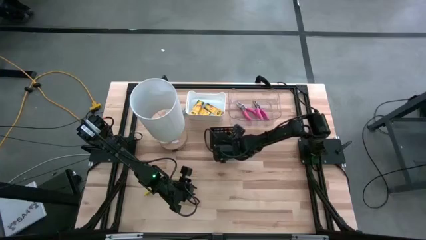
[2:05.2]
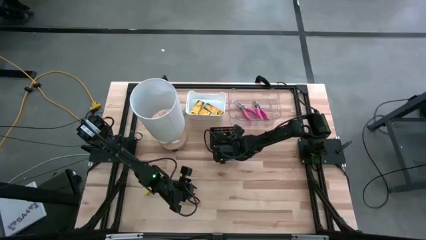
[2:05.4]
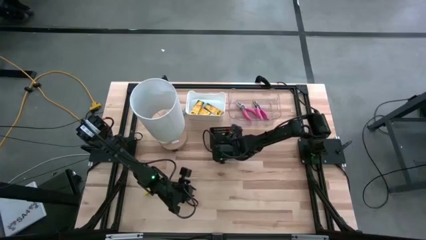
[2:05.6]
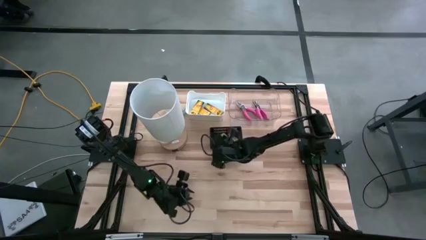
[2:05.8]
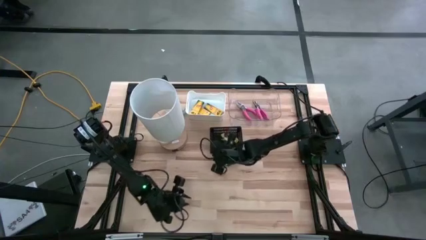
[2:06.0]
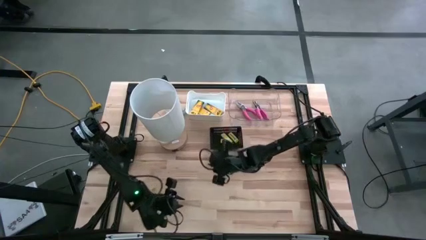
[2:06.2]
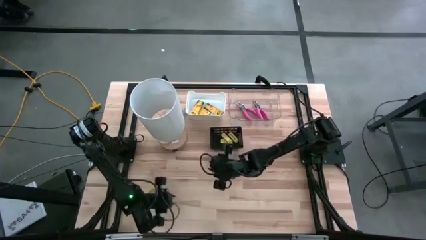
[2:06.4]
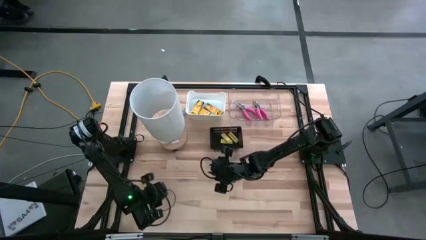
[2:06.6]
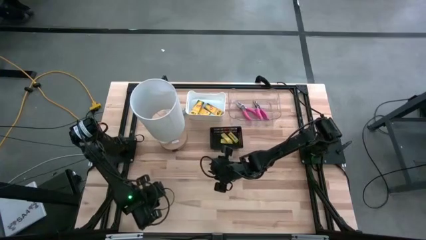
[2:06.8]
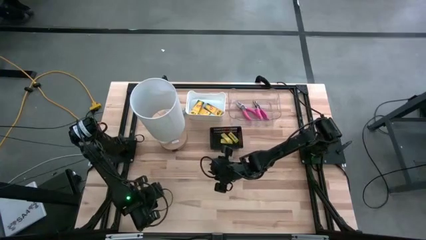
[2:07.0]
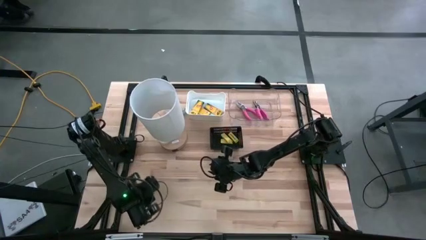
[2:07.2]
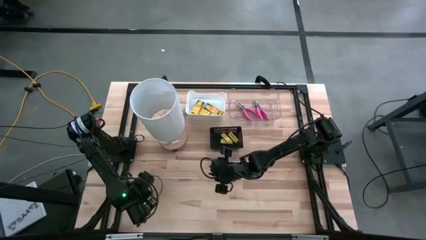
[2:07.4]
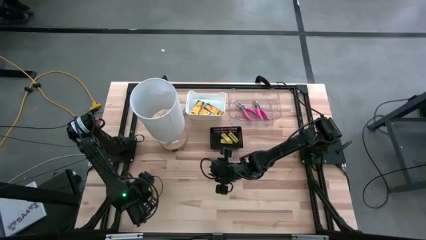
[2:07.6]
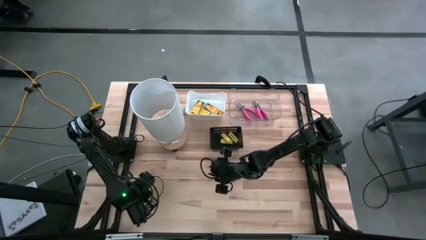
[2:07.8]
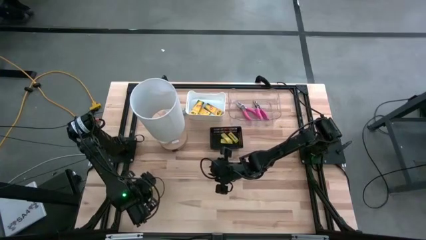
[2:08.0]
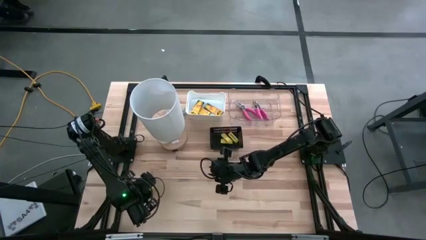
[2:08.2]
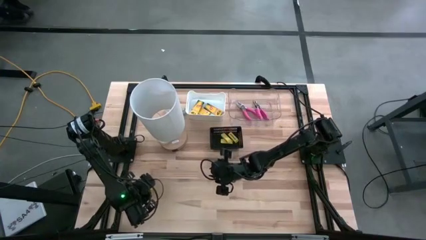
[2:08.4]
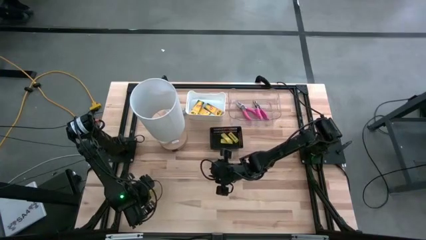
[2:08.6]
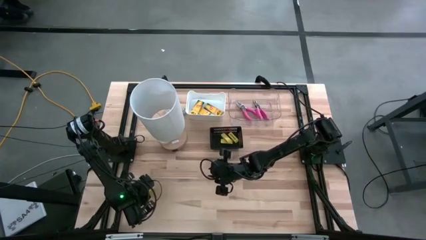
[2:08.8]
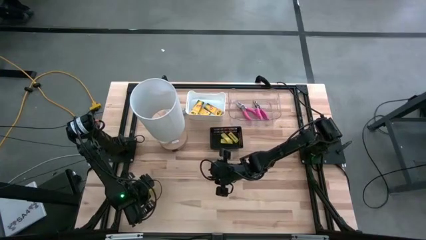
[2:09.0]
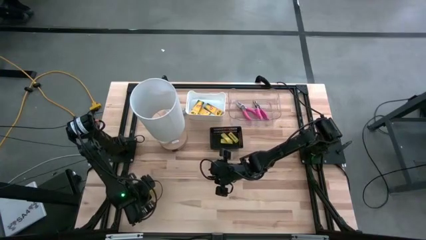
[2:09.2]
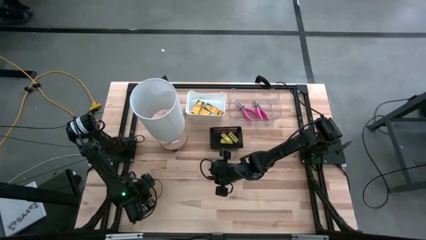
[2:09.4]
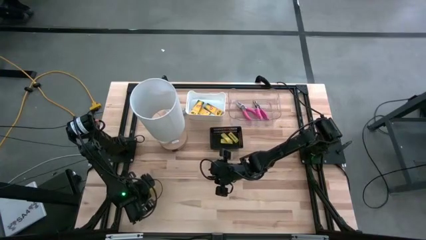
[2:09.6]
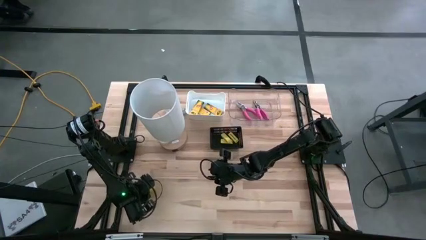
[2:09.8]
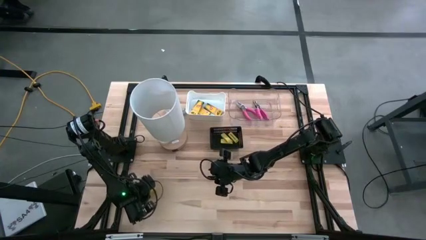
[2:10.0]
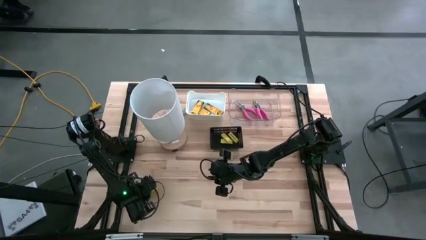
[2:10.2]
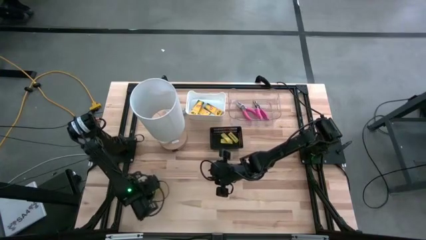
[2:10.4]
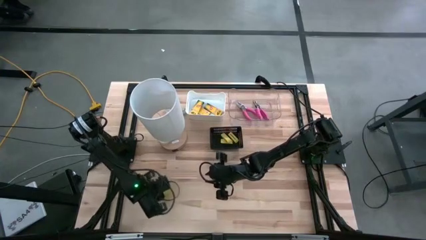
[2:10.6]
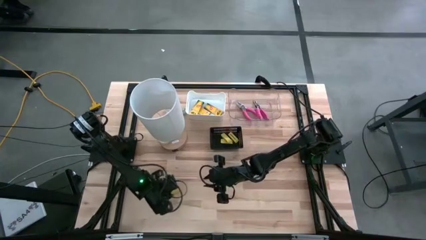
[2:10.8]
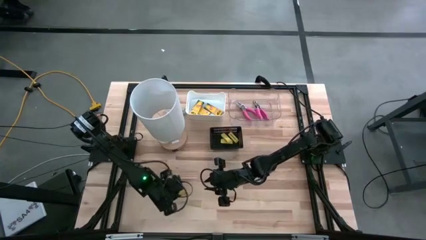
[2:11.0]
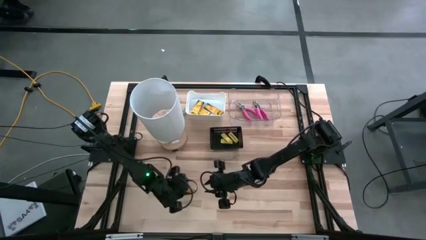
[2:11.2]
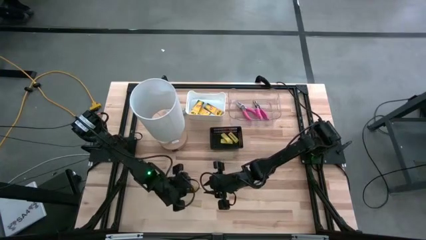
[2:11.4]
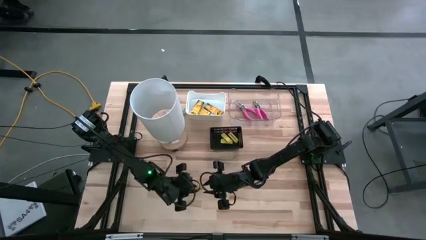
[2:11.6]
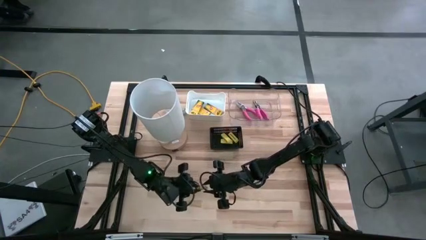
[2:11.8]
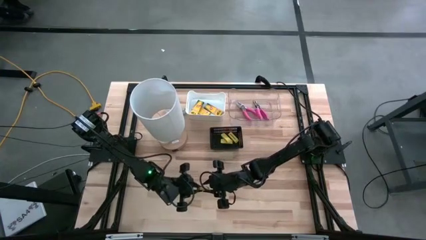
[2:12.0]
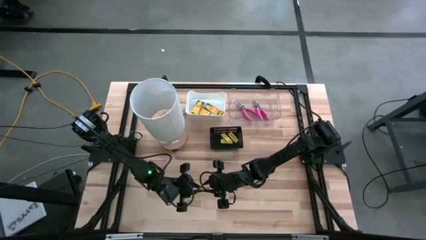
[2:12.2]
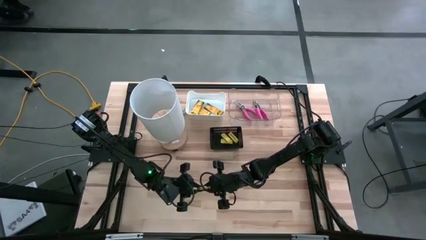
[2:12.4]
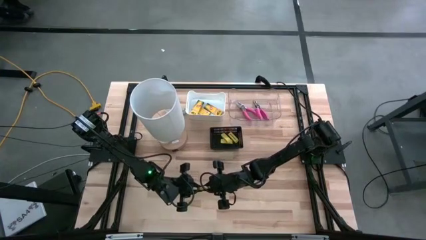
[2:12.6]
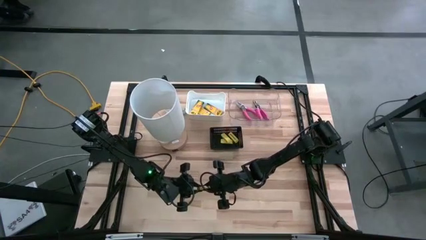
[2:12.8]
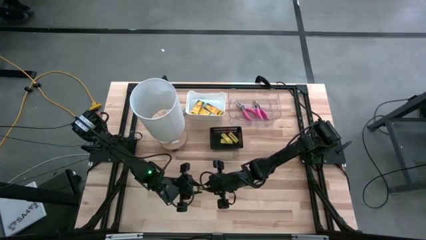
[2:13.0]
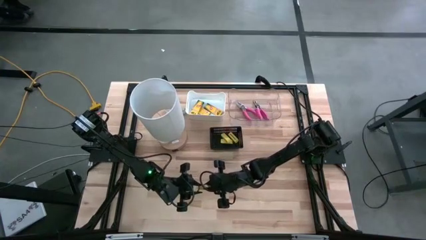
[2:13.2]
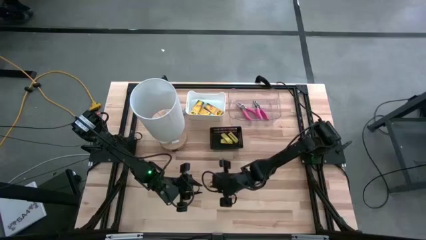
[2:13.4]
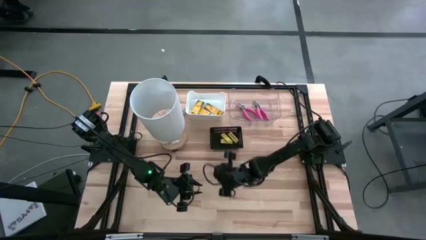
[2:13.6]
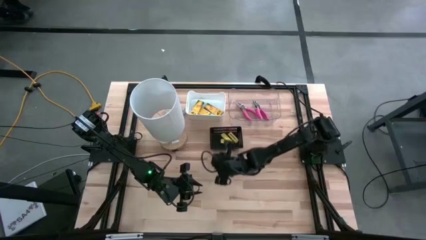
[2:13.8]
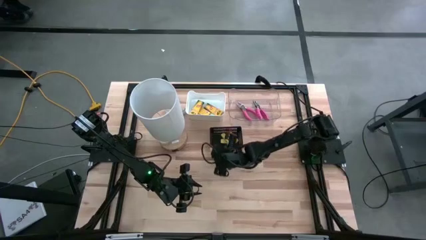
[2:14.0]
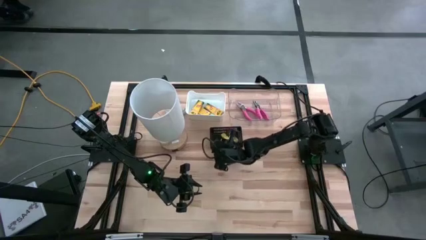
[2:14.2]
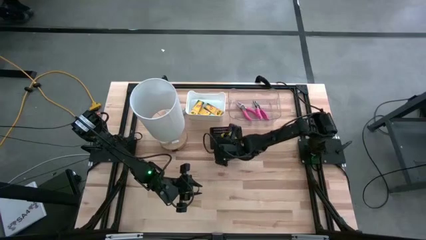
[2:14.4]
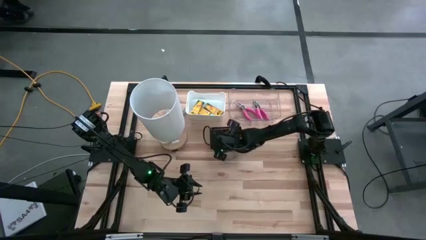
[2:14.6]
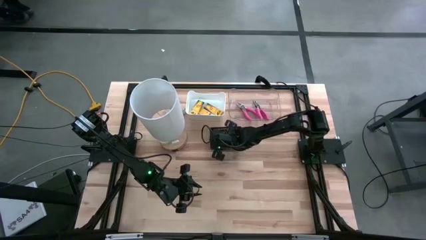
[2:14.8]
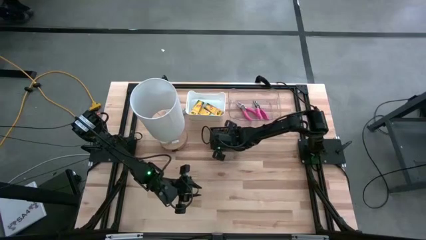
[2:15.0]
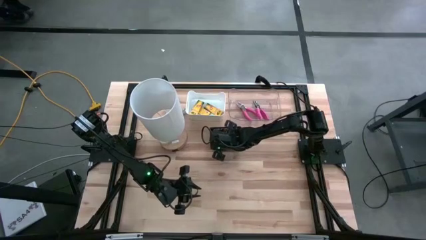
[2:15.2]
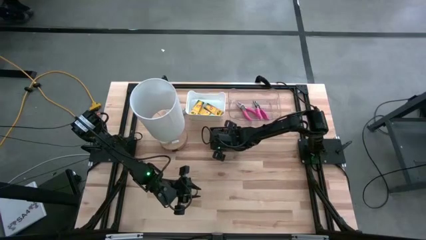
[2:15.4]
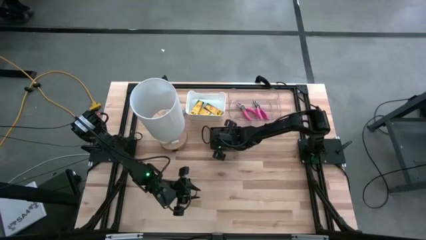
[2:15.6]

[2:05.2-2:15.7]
Task: Pick & Place School Supplies
Put the yellow eraser into the black bin

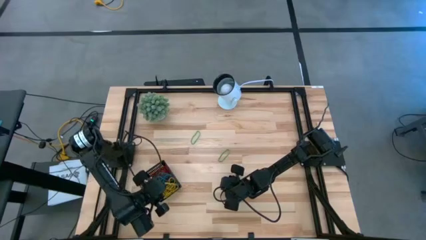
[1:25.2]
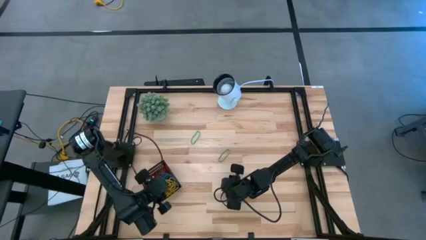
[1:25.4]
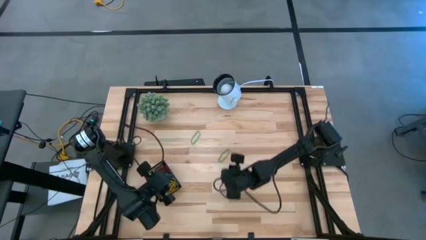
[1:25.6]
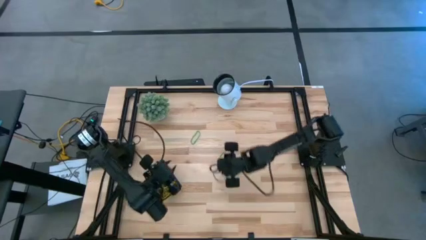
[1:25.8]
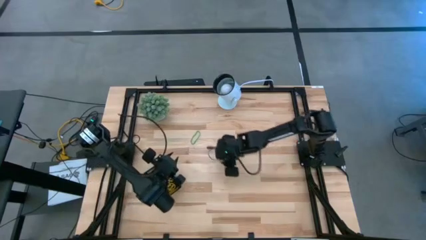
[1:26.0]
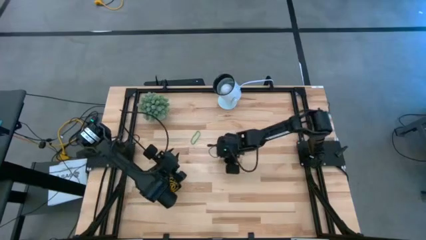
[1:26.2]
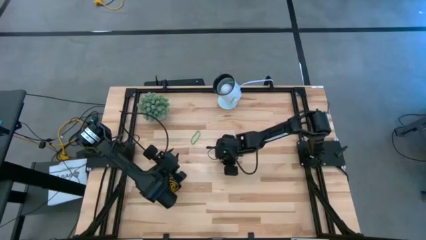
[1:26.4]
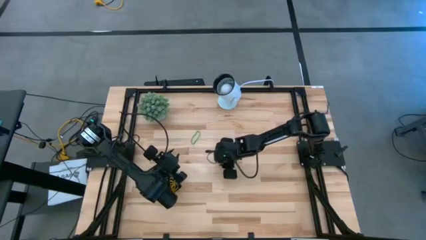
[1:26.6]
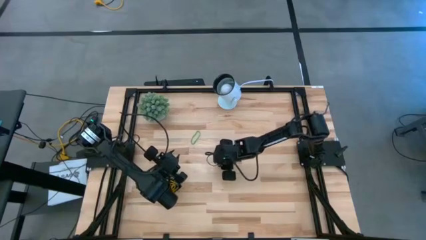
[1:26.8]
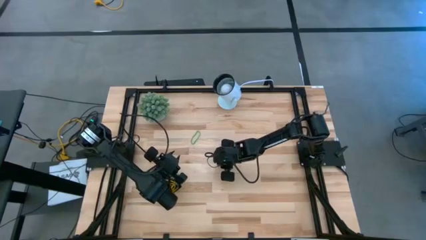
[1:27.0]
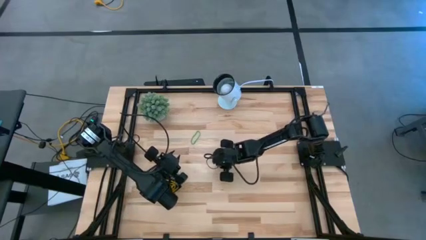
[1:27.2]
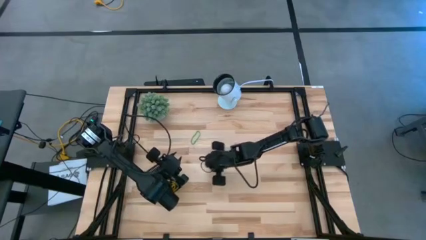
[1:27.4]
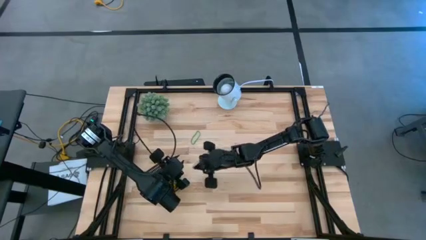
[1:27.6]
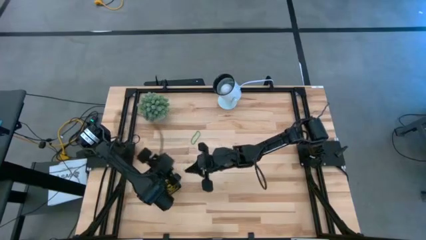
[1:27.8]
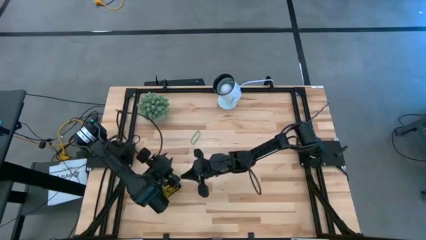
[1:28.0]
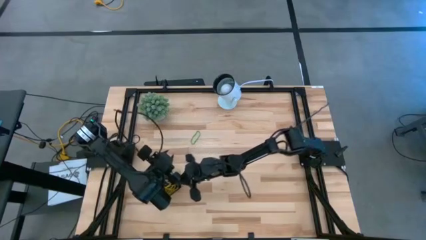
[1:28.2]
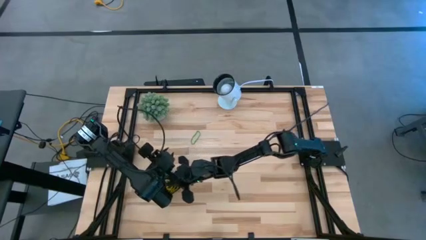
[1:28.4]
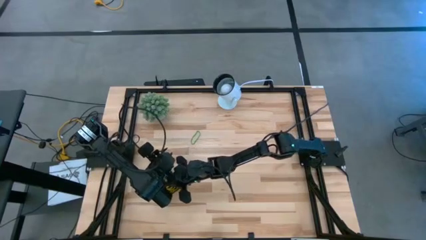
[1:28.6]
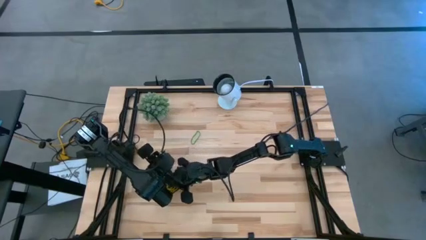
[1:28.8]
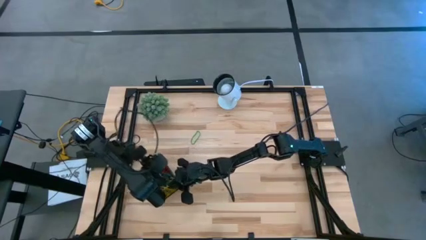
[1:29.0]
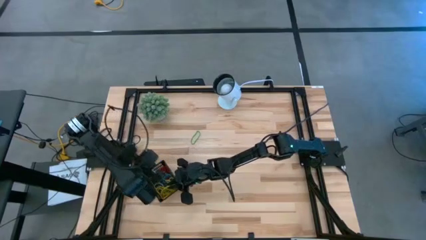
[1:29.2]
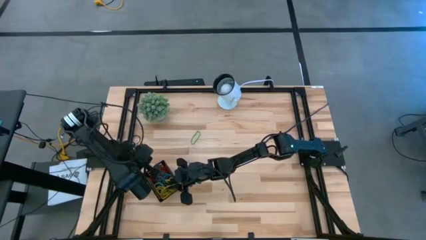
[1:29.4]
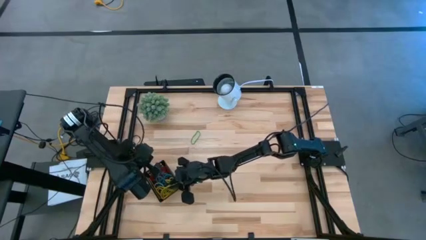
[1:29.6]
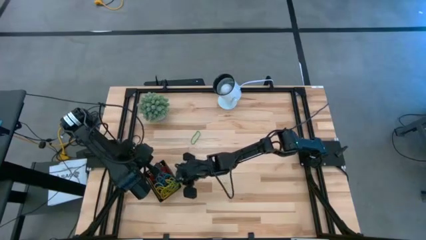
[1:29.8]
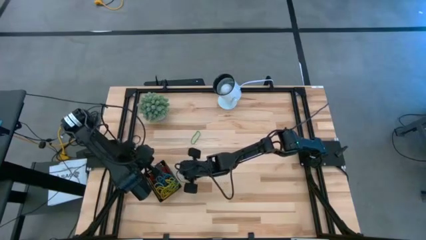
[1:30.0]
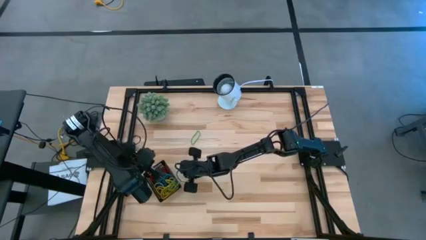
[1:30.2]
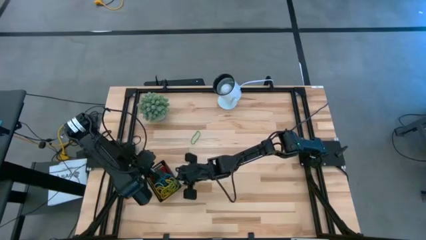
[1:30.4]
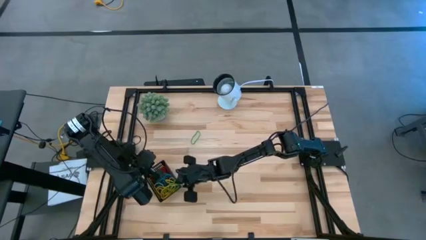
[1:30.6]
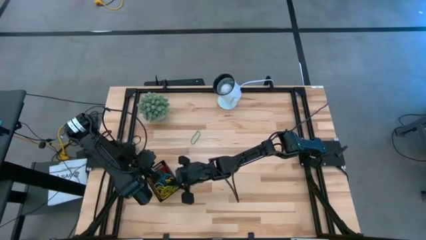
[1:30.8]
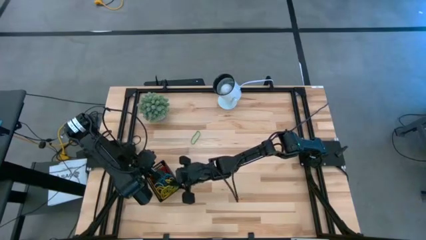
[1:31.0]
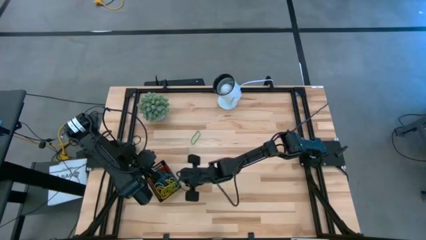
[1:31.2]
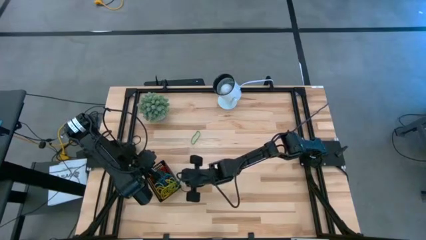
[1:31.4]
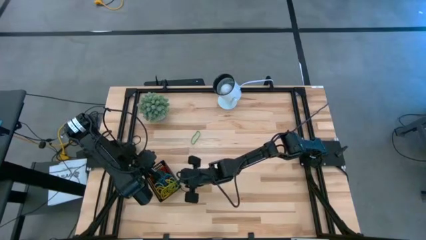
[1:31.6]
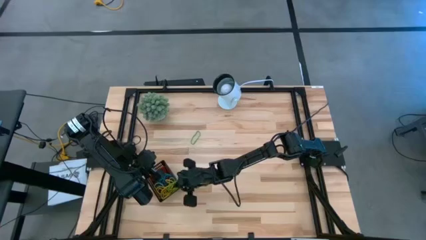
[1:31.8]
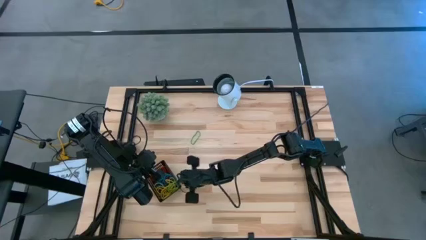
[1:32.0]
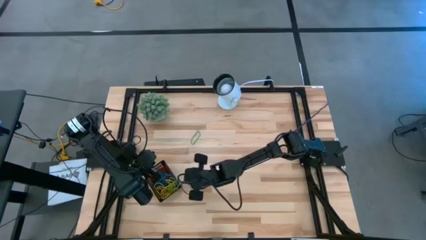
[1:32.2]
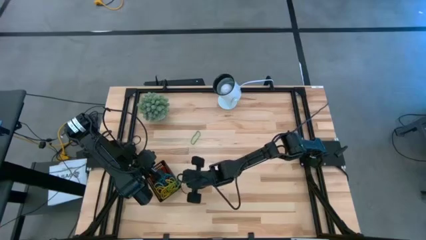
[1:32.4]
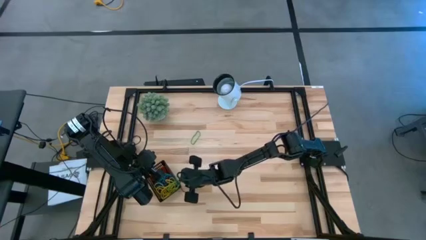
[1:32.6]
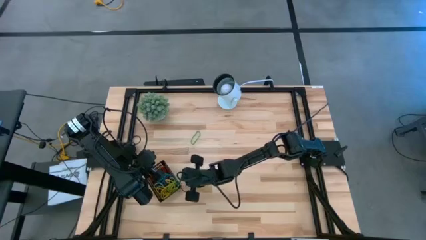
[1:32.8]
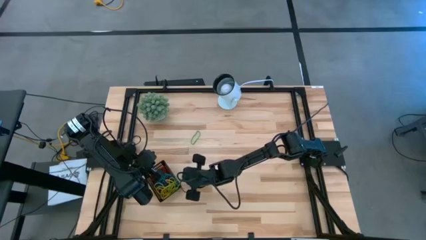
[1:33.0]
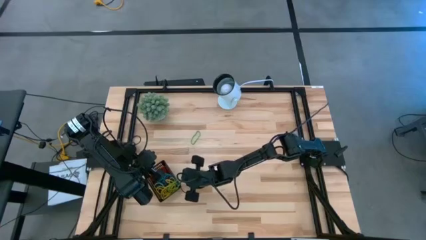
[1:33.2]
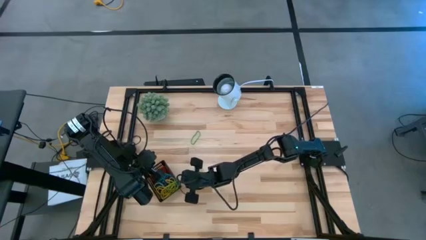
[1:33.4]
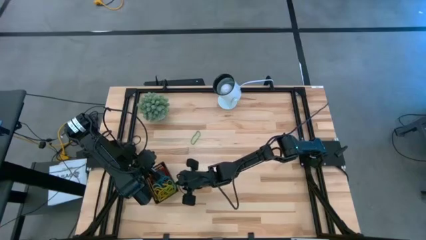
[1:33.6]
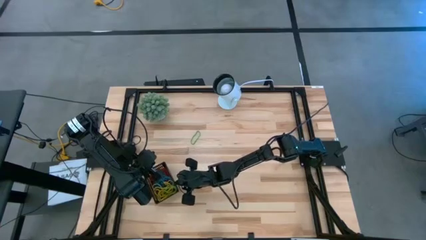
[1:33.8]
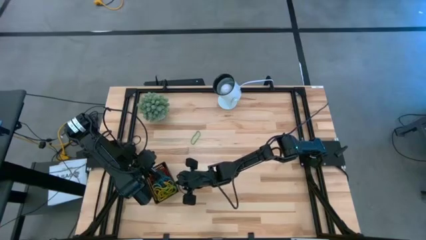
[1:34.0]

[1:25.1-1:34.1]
Task: Pick and place items into bin
Put the green rubber band into the black bin
